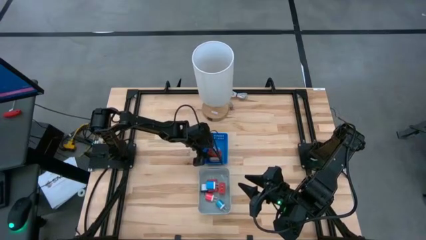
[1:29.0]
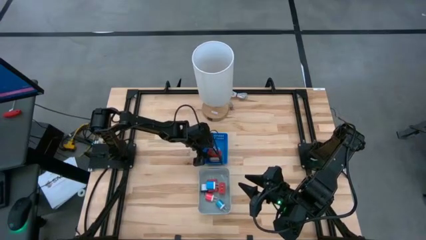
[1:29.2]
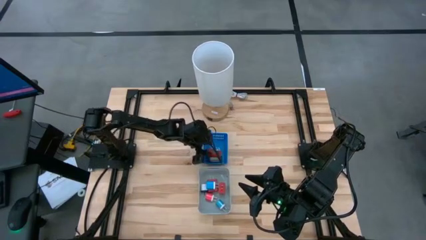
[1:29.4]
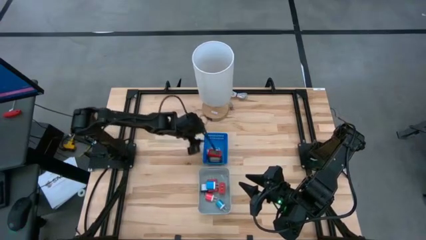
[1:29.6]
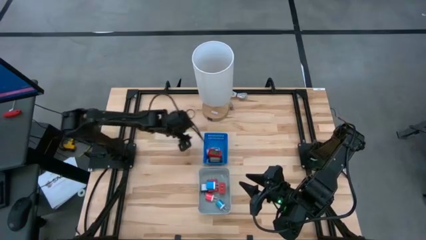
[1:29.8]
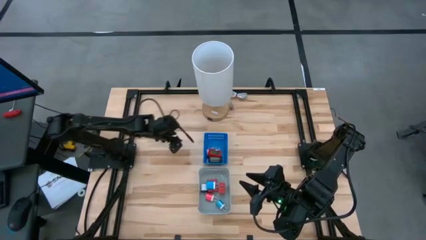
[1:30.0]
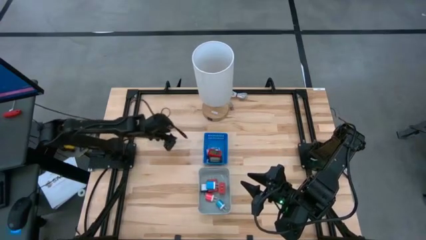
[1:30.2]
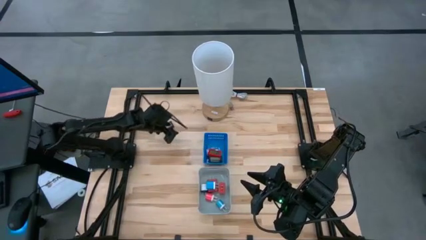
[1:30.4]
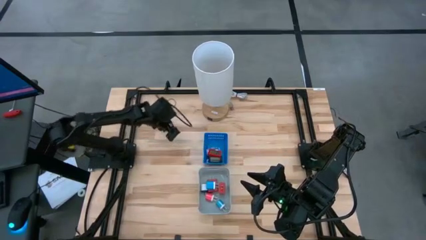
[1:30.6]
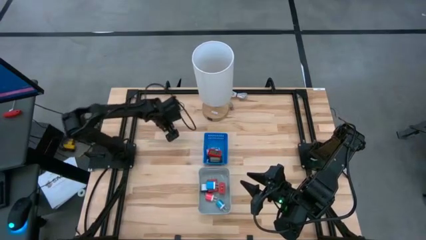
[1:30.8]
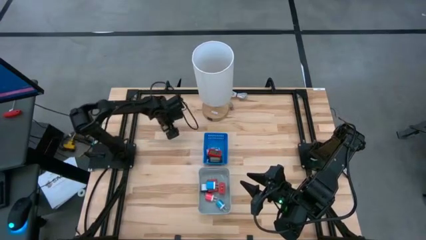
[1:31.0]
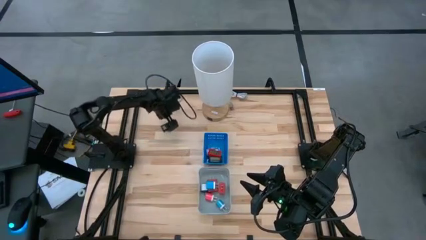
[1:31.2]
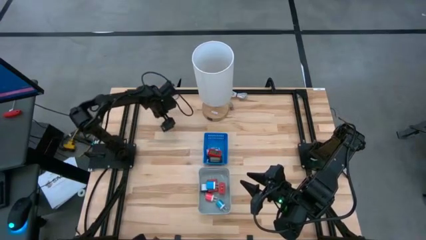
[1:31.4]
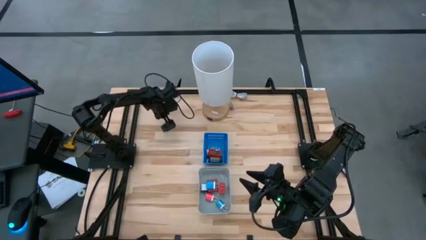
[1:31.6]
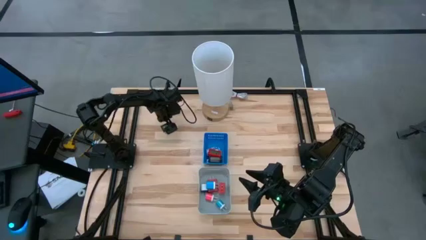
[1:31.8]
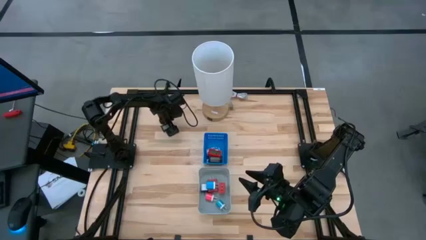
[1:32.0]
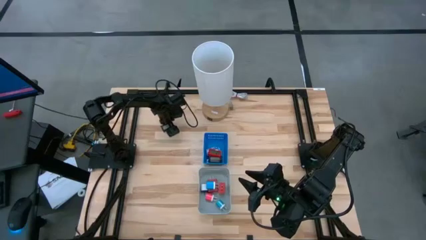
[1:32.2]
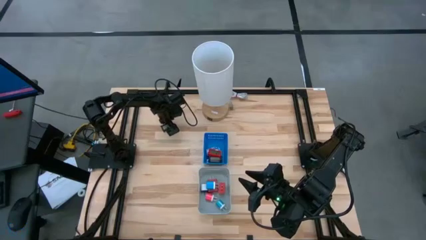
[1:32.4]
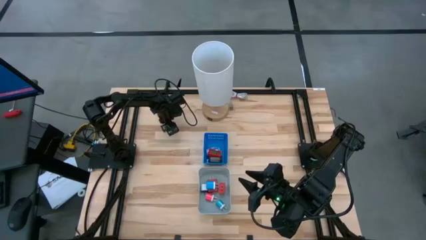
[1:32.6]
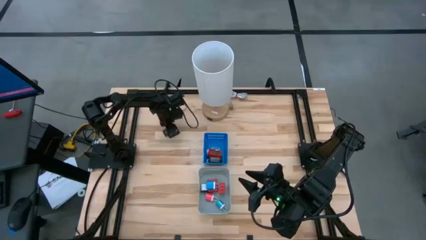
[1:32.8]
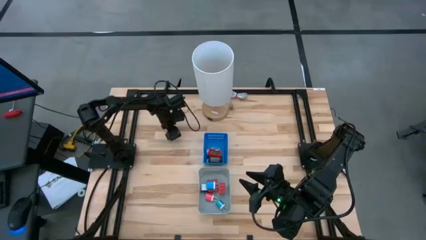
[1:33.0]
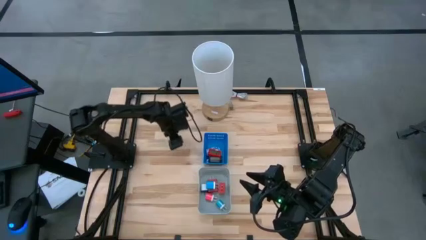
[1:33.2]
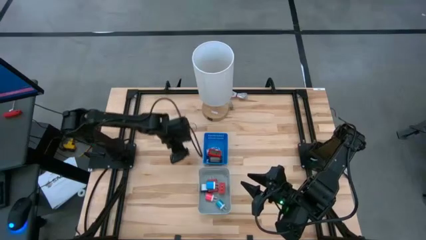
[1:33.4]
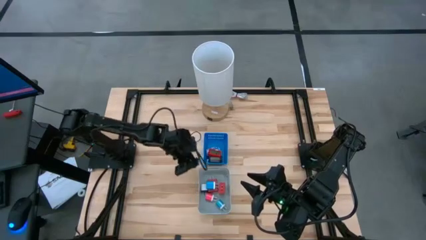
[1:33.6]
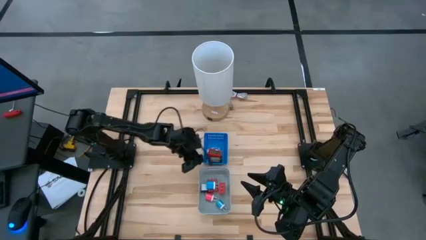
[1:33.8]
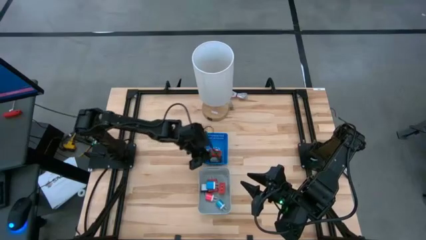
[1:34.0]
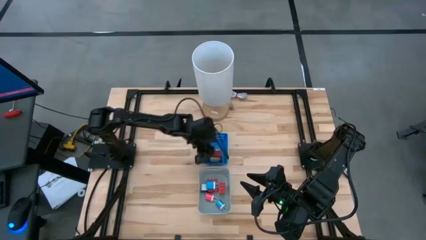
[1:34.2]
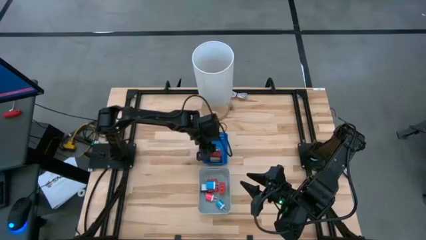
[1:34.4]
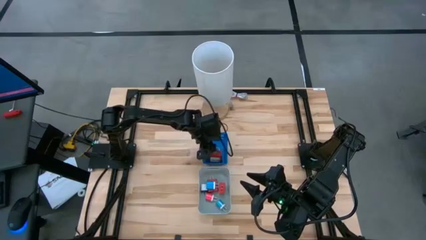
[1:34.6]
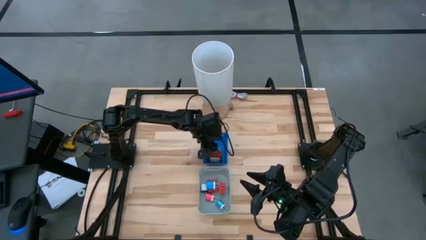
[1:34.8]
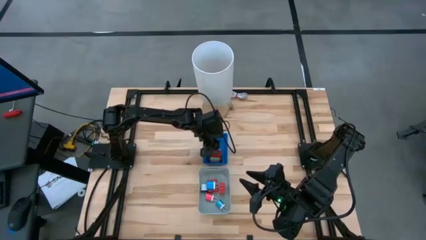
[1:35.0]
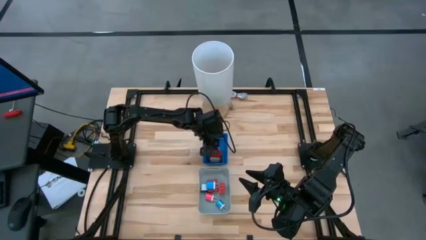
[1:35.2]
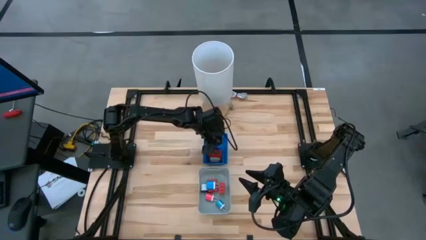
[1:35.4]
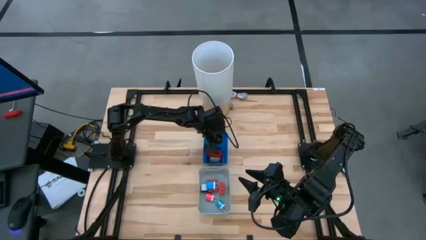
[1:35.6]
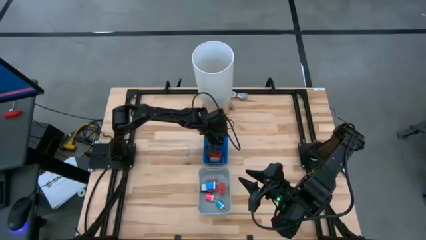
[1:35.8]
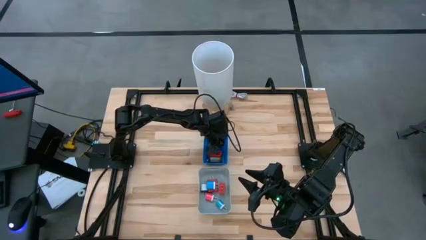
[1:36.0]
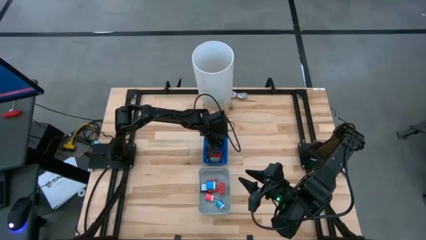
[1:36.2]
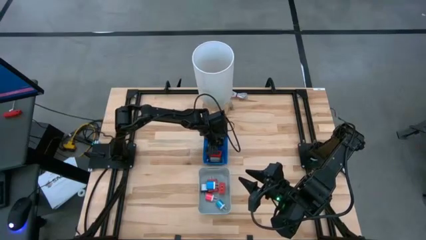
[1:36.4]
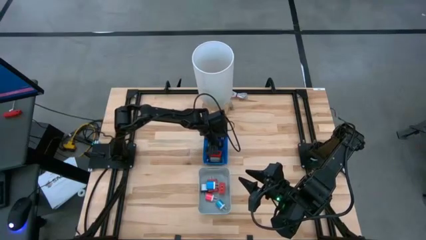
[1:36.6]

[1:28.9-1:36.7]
Task: Pick & Place Office items
Put the black digital clock into the blue bin

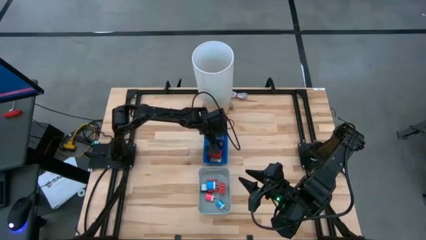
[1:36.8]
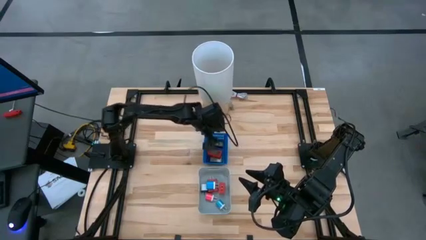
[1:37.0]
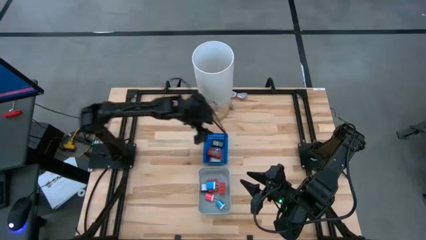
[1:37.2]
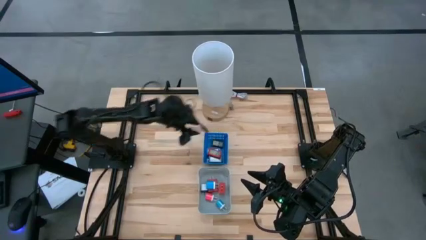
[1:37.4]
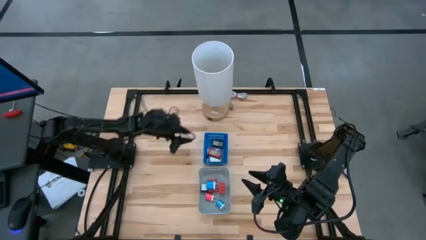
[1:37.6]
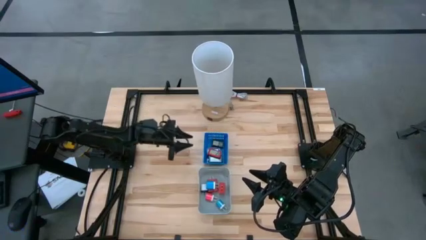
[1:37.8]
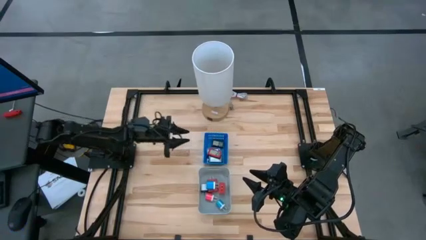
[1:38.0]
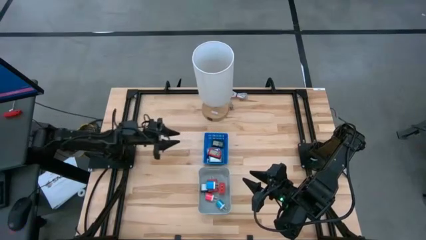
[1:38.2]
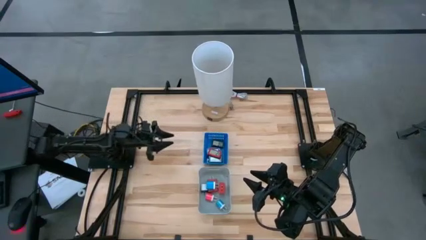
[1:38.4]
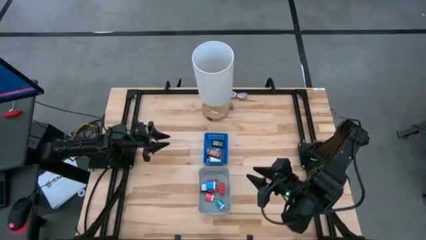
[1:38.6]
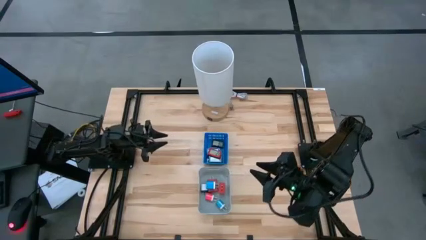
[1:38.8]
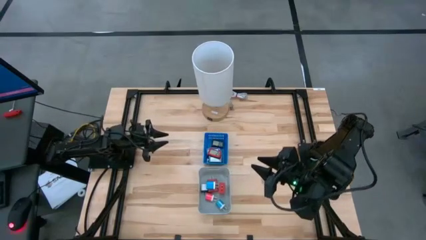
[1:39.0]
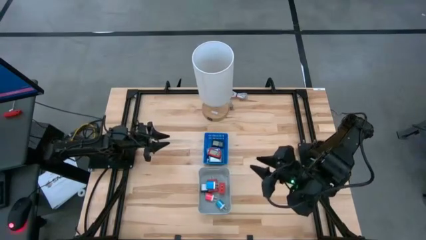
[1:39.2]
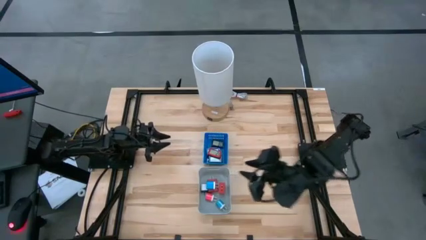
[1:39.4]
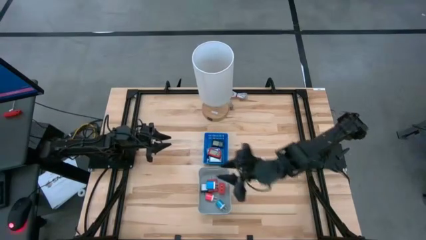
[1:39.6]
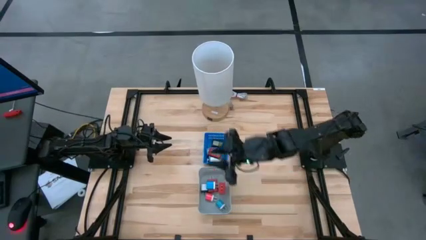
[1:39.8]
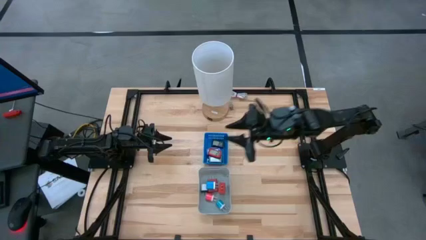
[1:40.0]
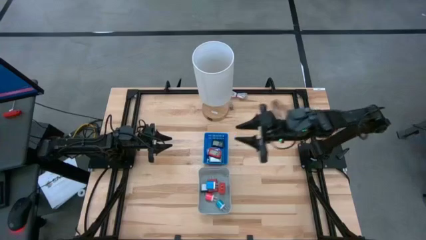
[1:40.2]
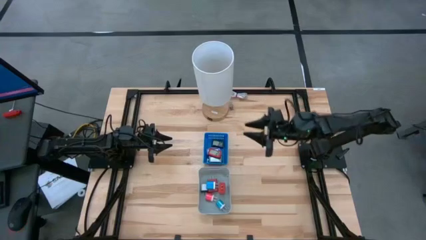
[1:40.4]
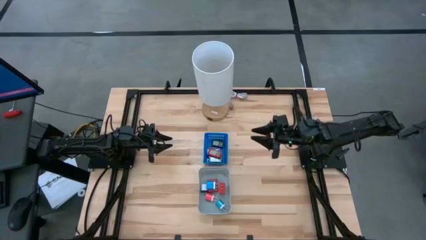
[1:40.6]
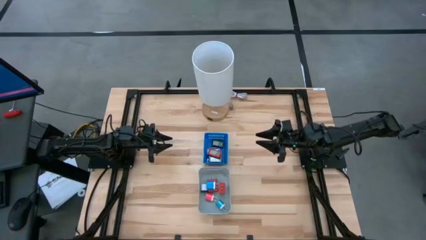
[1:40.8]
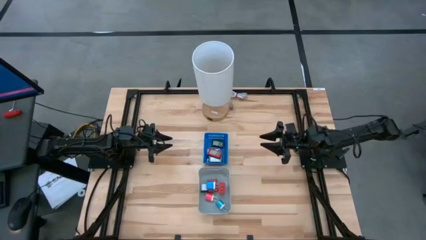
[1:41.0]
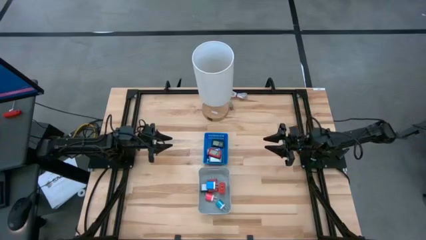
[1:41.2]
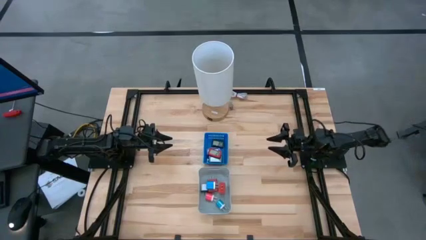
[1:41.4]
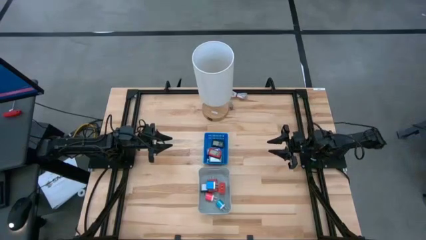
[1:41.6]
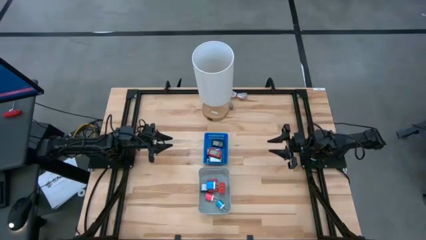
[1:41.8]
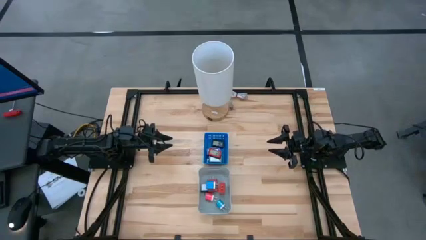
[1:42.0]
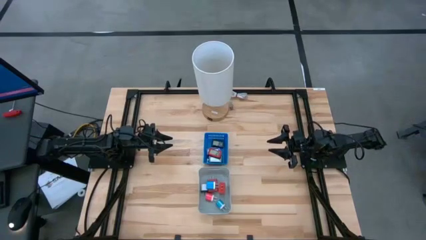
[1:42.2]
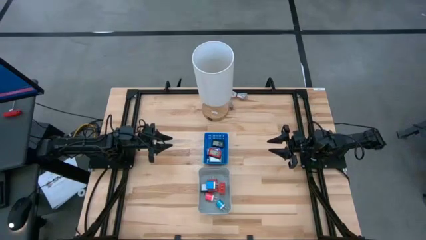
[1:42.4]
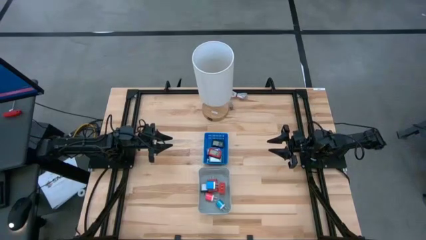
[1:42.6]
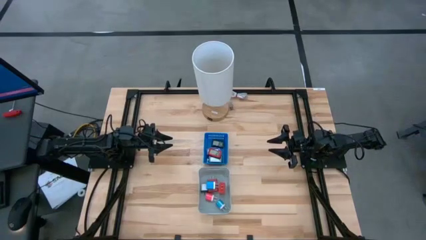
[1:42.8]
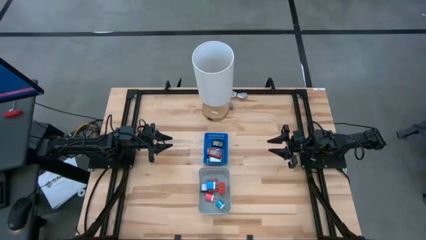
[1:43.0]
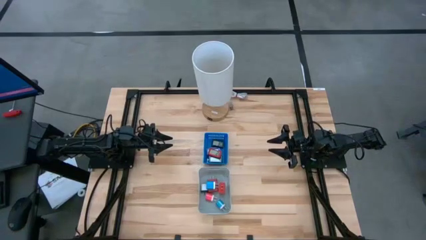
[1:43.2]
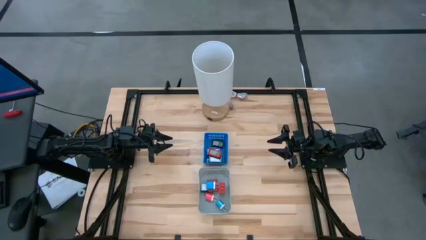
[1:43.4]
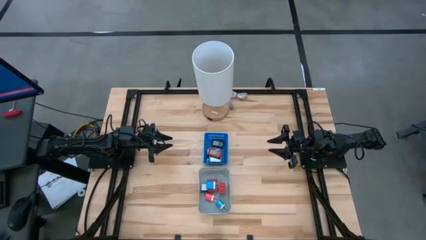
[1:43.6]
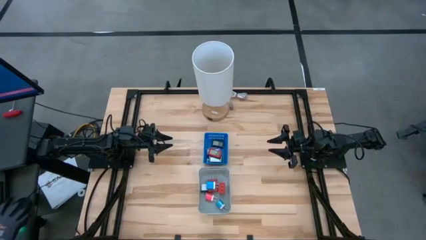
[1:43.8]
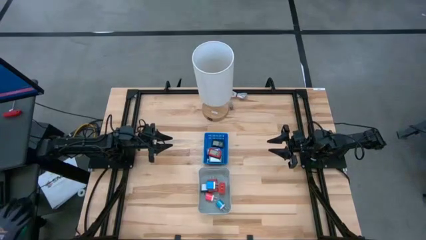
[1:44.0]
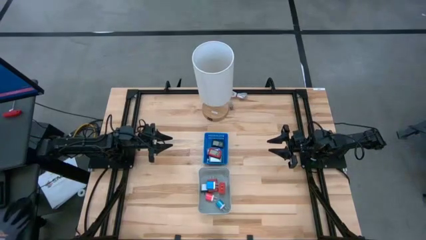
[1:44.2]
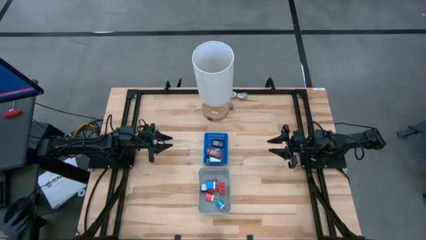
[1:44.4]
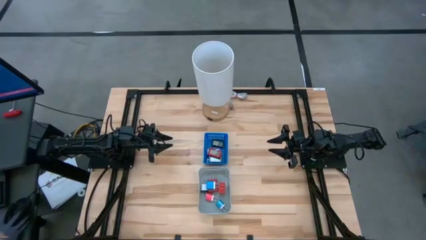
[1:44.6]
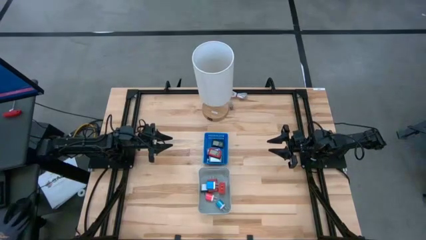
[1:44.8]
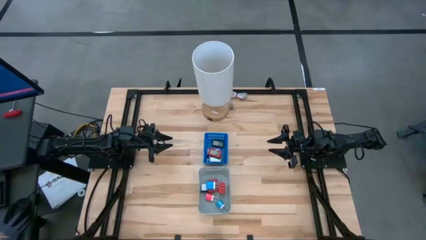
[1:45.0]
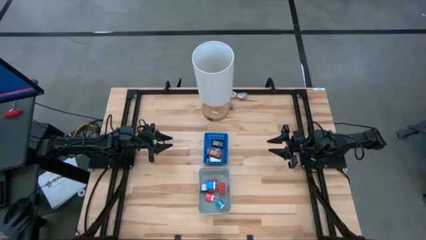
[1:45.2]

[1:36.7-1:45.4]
Return to Home Position
